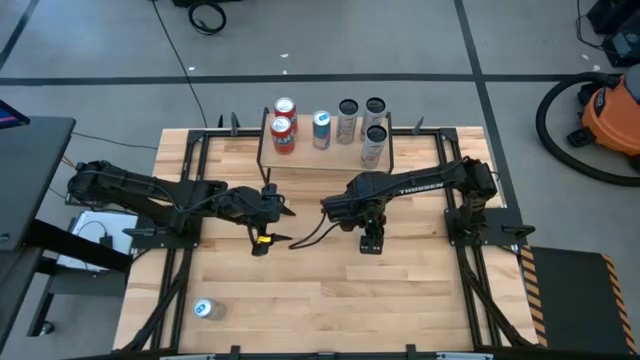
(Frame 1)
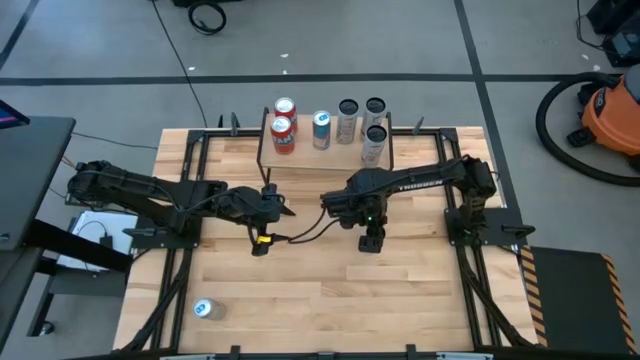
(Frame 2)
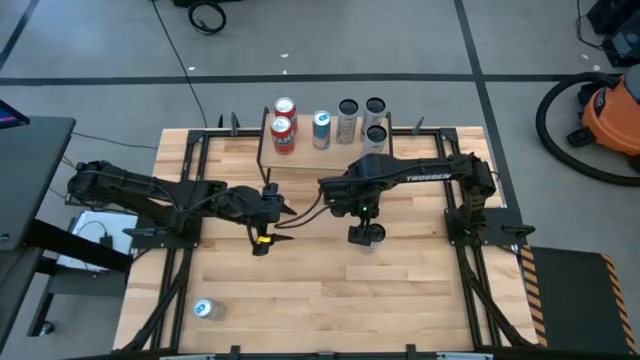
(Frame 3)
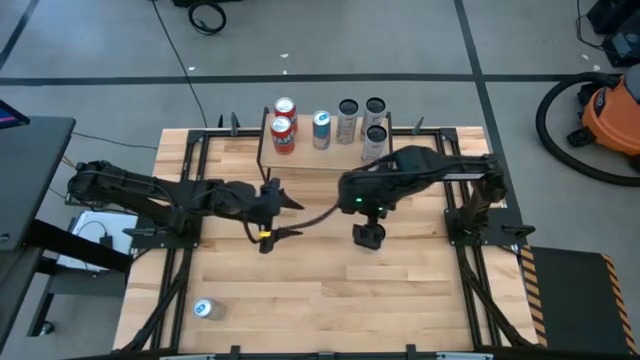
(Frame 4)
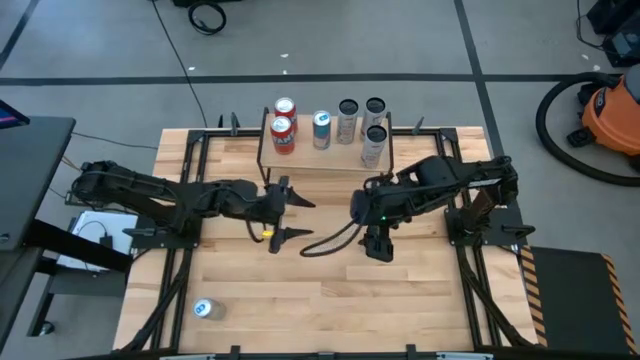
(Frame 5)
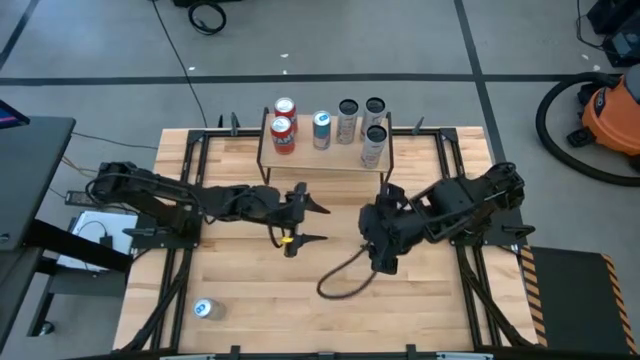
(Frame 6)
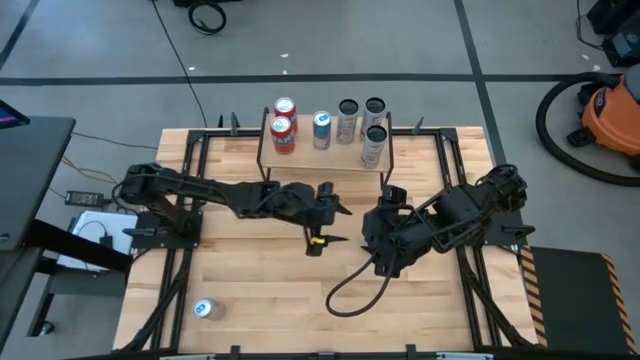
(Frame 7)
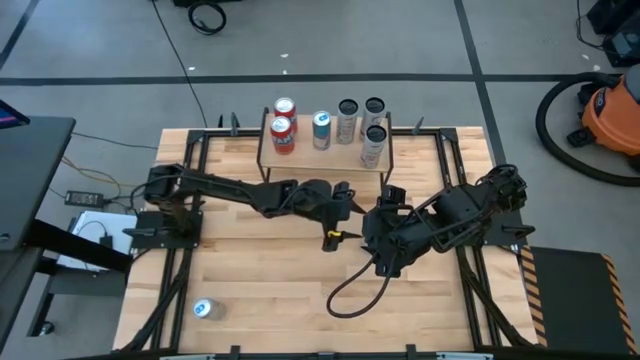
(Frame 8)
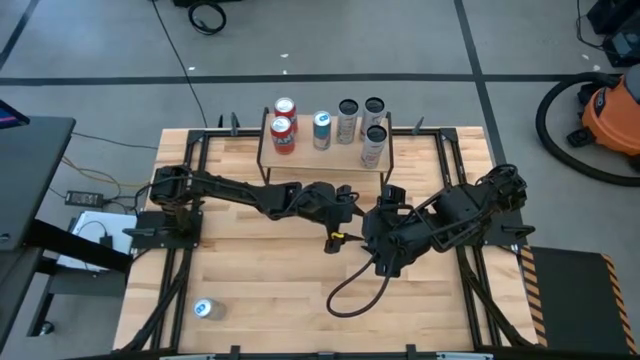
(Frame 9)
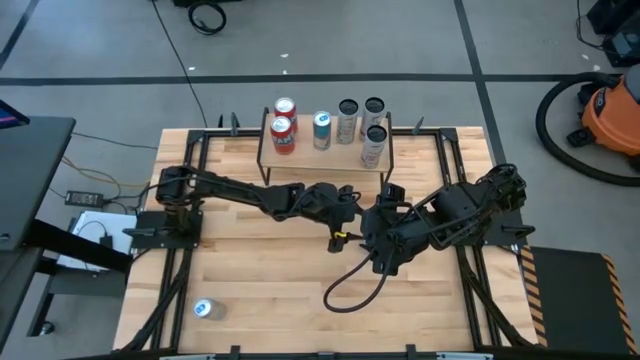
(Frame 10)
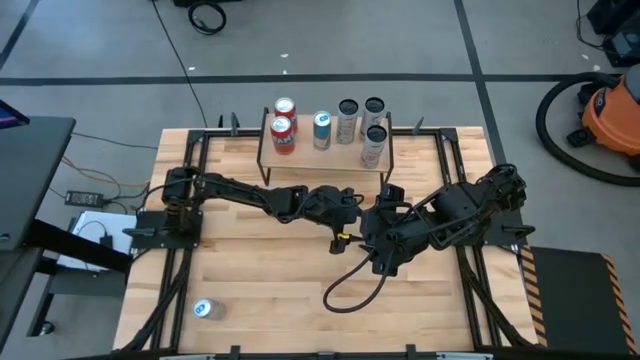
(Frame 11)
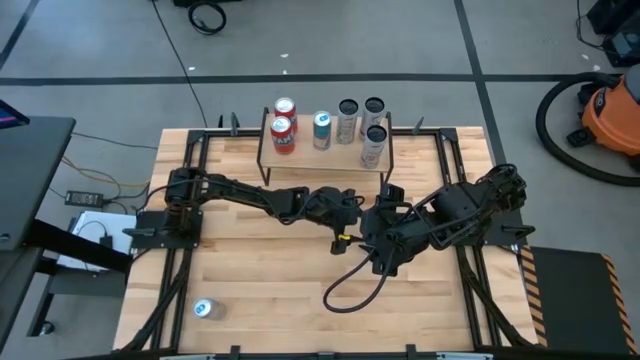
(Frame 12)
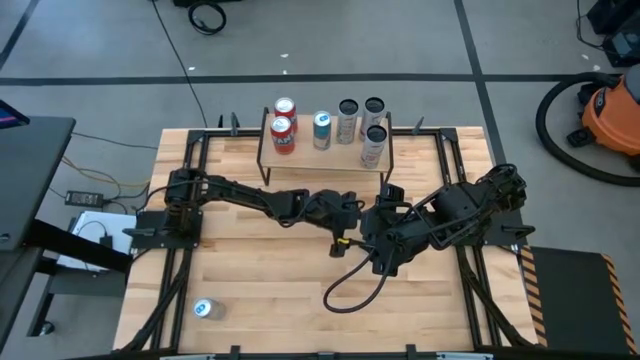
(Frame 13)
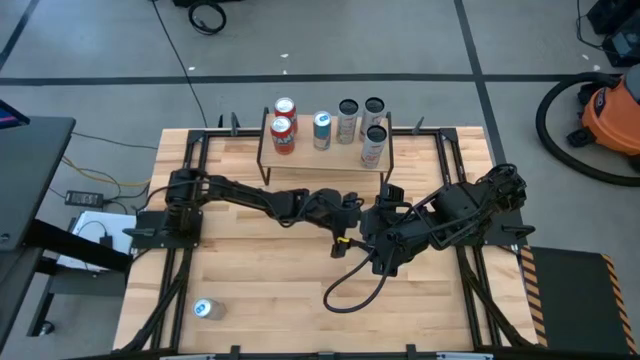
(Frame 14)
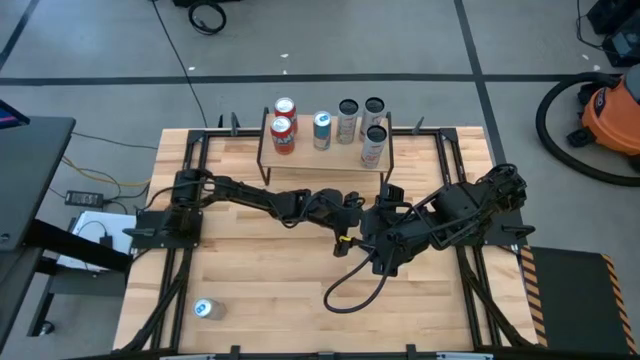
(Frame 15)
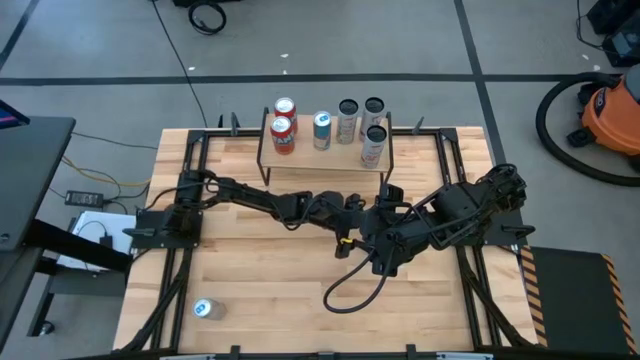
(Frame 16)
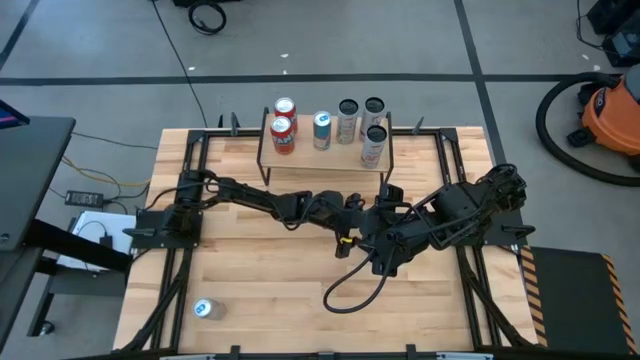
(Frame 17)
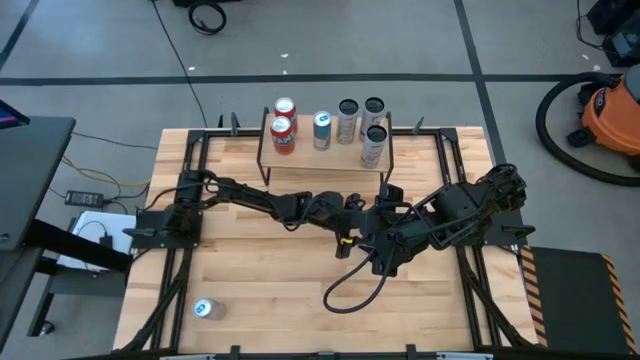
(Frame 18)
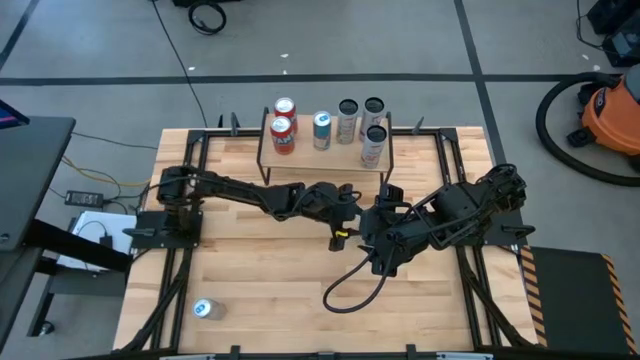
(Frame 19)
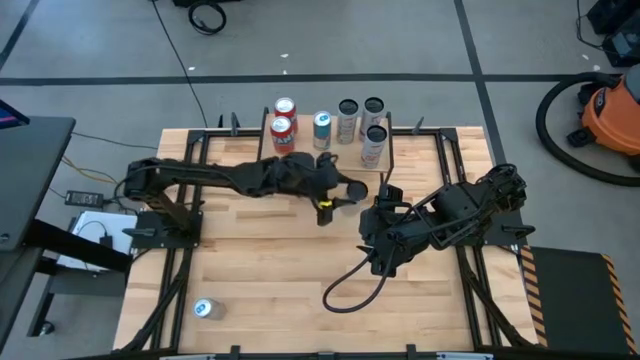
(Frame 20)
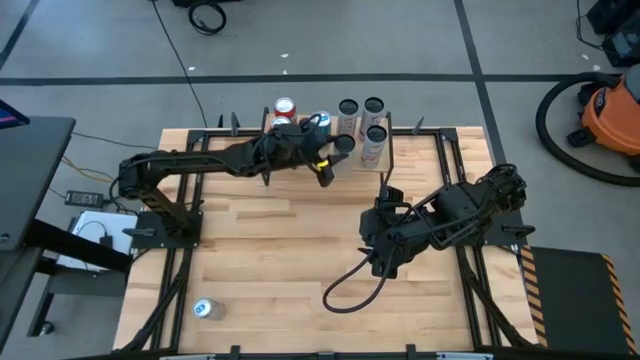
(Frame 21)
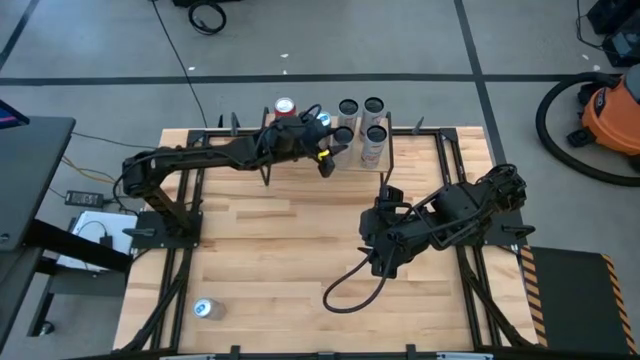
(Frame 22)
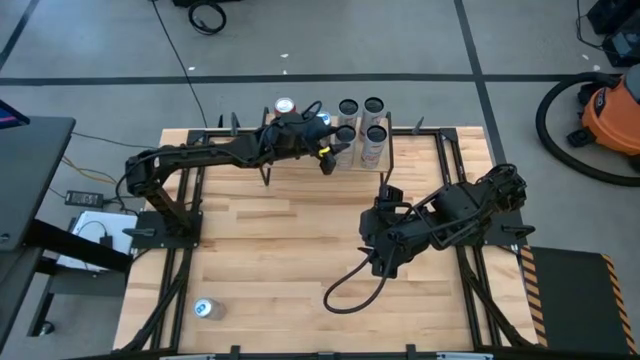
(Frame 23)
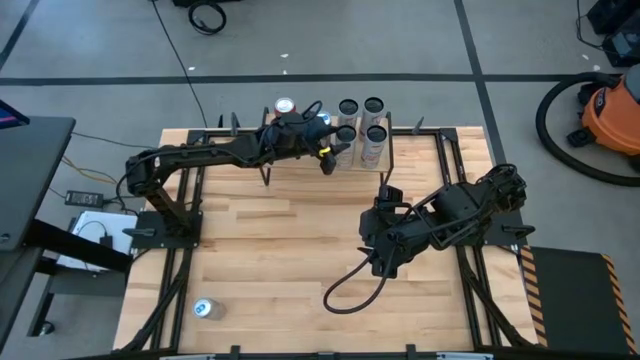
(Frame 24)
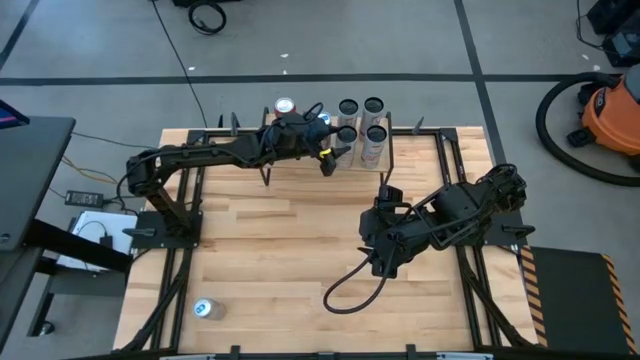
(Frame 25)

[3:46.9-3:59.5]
Task: Place canned beverage on shelf
Put the white yellow soda can on the shelf aligned with the other white yellow soda can
